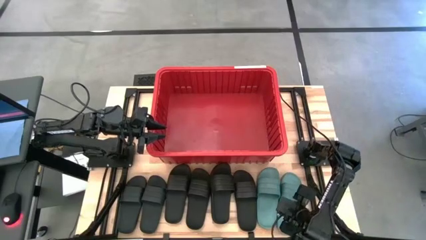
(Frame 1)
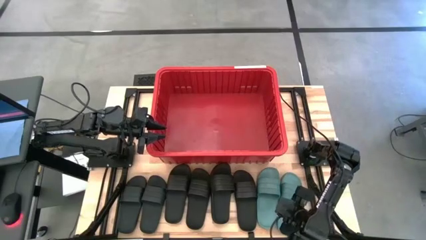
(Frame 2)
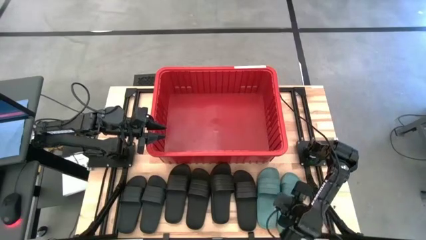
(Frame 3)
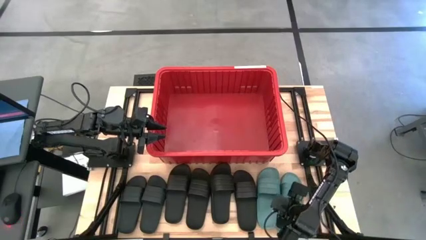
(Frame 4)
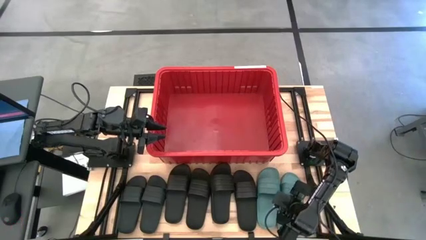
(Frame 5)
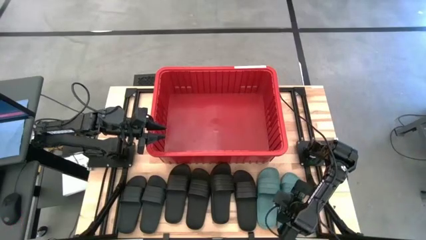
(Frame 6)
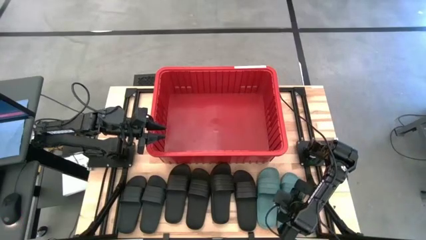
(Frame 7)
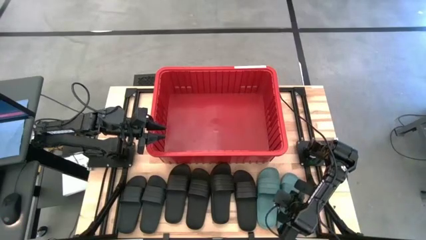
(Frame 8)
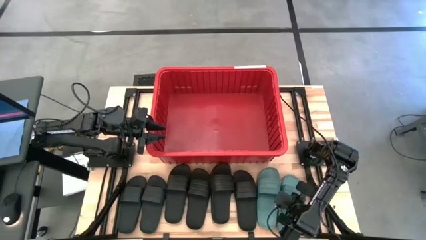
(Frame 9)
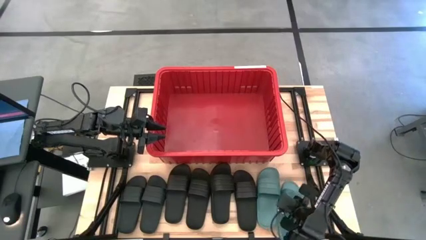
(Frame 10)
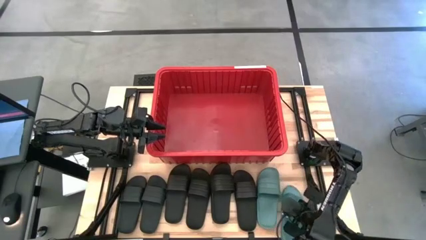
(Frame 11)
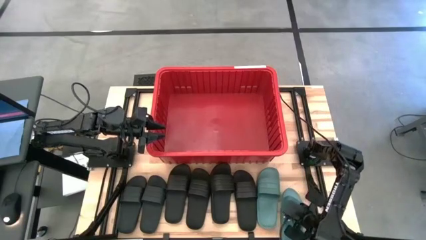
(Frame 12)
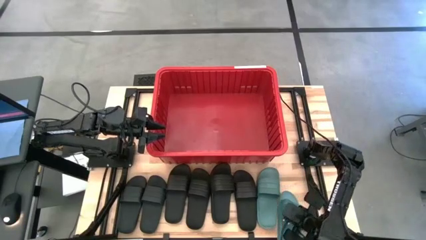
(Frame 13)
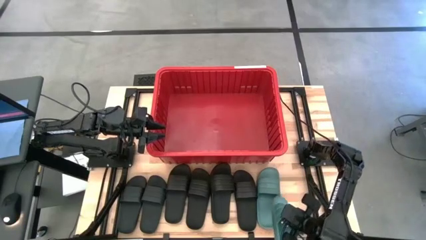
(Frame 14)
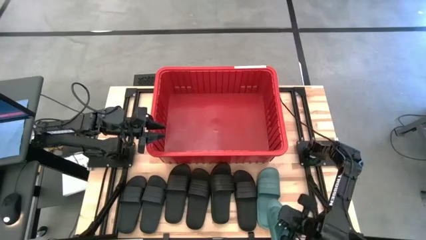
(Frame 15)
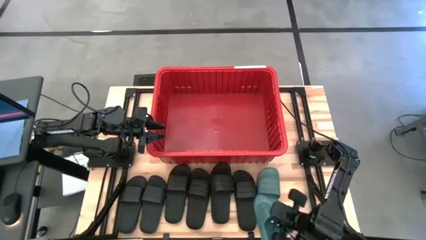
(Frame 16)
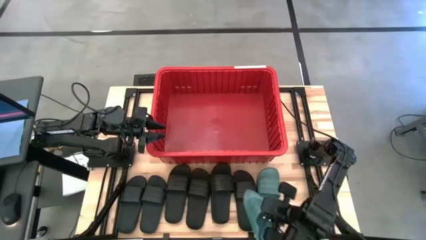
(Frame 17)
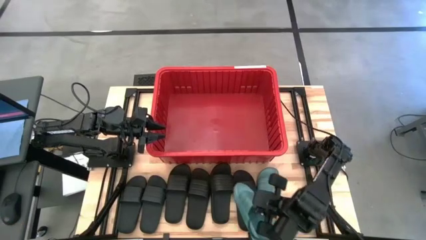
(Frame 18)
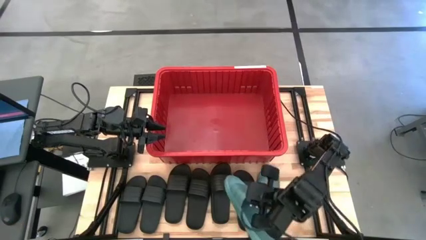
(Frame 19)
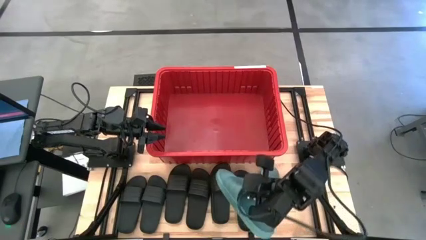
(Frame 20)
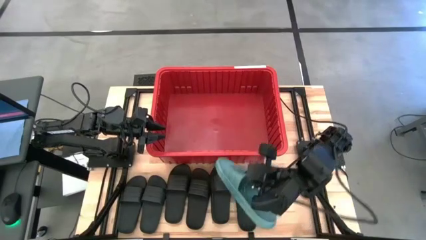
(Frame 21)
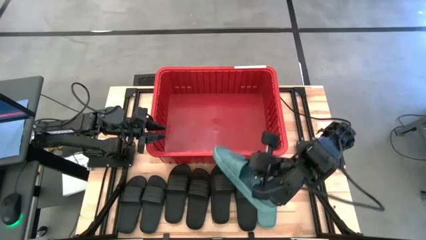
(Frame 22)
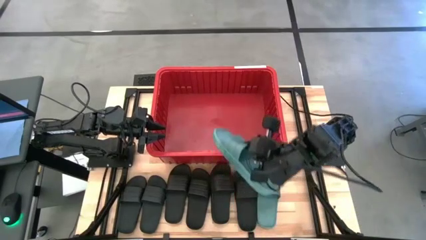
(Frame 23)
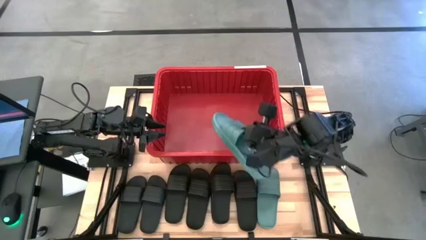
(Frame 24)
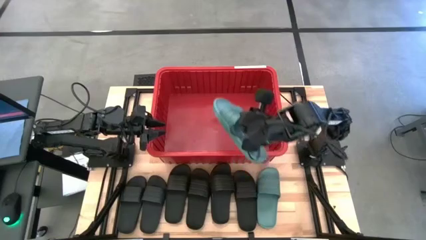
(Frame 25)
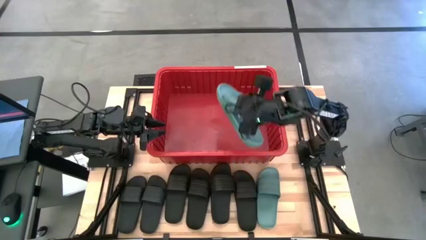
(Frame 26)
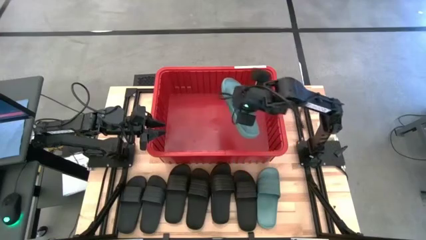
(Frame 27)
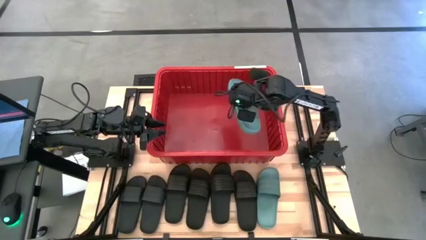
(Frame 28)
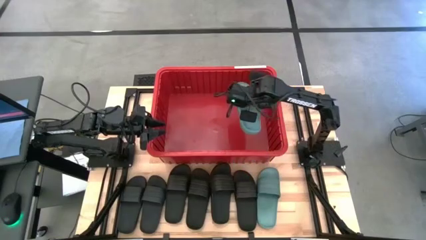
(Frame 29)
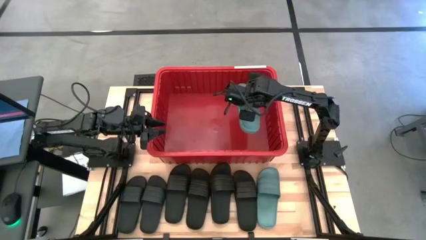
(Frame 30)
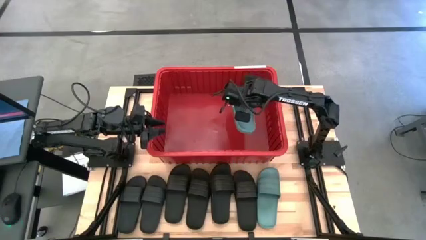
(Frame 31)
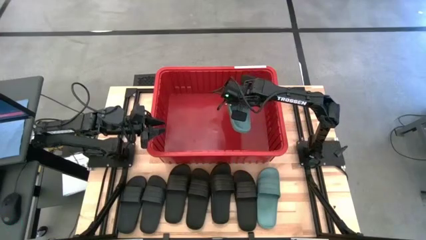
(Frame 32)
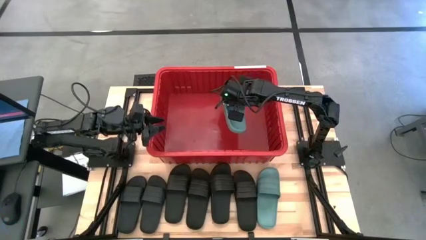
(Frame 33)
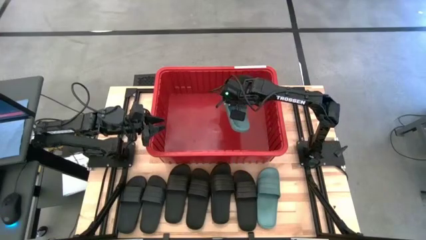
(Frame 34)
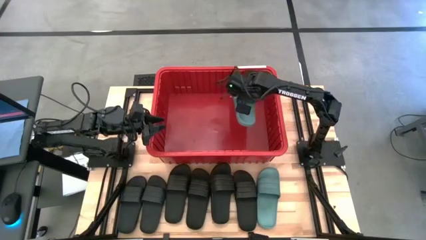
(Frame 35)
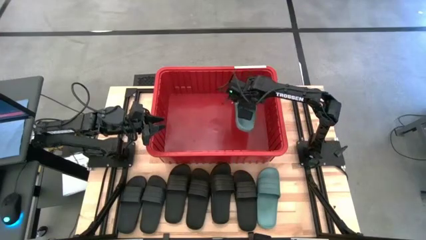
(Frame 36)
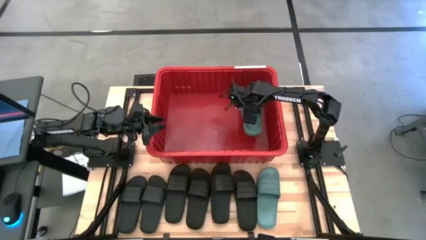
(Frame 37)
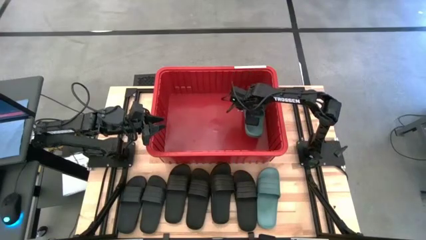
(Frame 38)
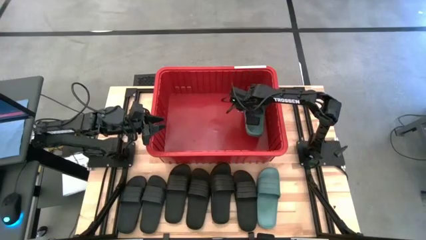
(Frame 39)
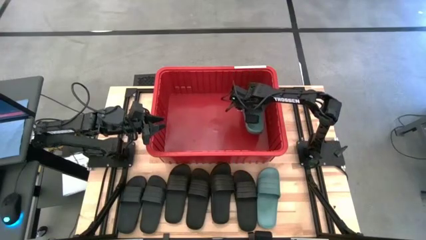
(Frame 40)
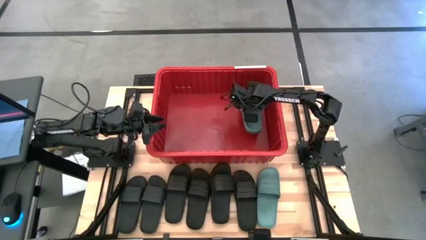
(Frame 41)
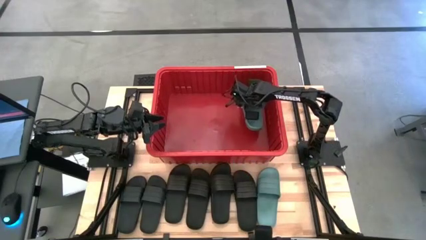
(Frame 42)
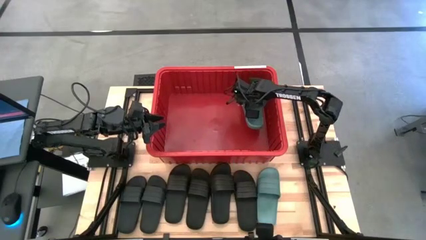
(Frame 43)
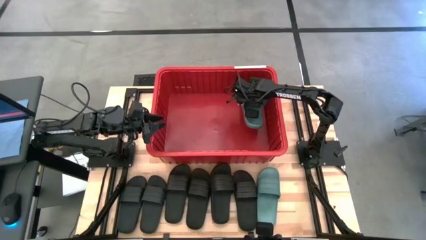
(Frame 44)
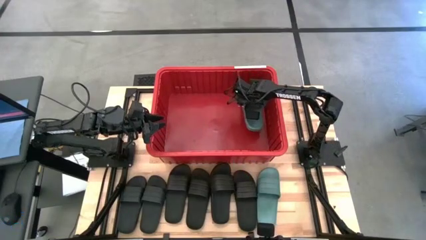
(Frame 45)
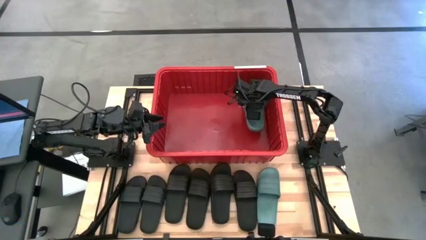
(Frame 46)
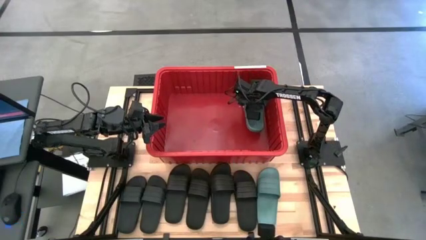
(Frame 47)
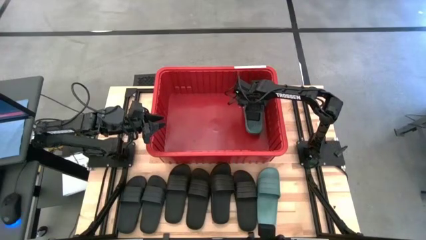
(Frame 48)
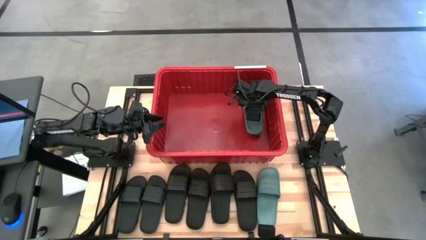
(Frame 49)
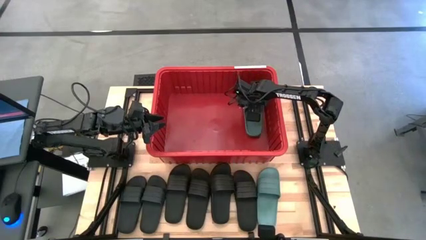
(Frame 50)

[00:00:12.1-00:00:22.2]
Task: Pick and place slides into bin
Put the right light green slipper into the red organizer bin
